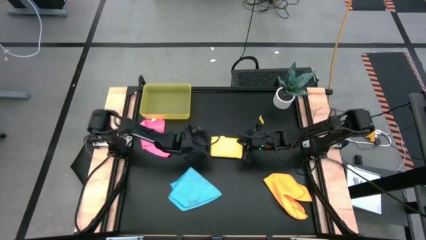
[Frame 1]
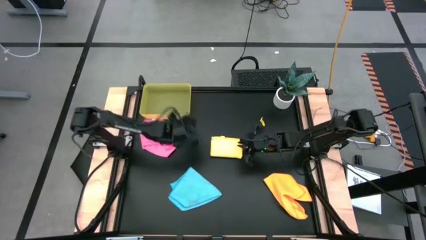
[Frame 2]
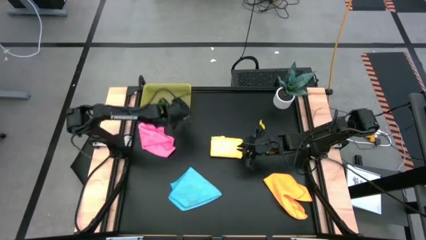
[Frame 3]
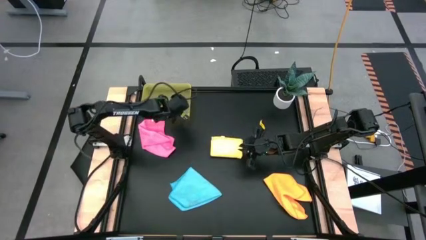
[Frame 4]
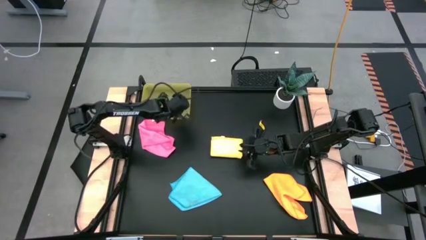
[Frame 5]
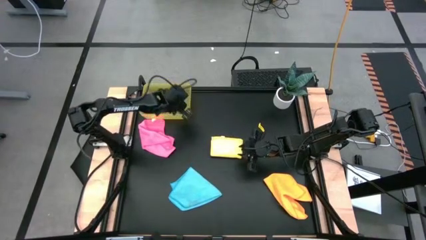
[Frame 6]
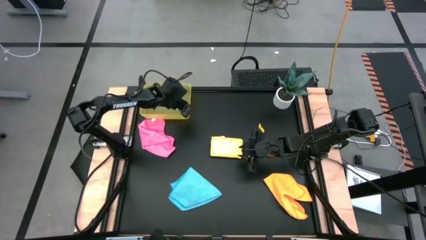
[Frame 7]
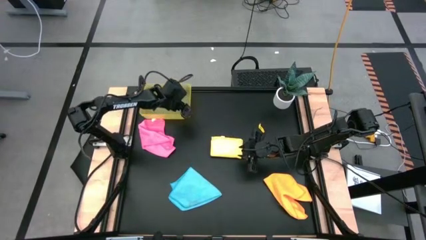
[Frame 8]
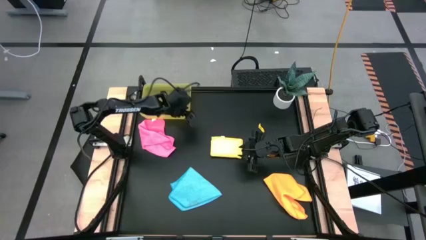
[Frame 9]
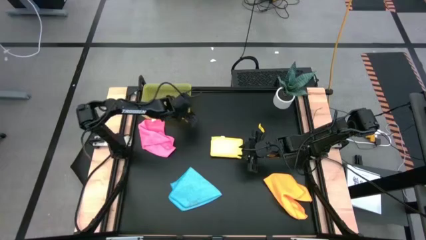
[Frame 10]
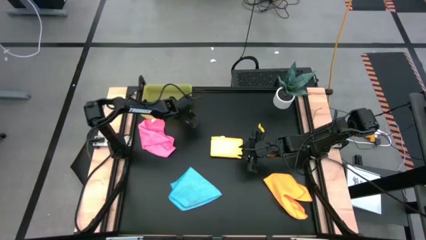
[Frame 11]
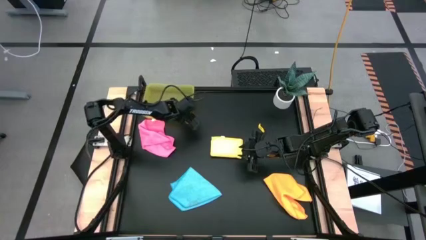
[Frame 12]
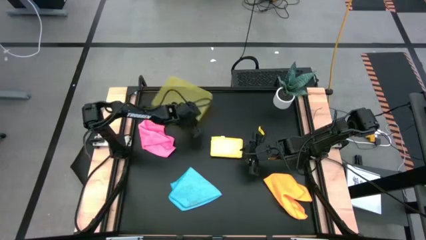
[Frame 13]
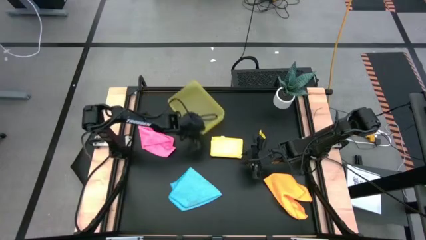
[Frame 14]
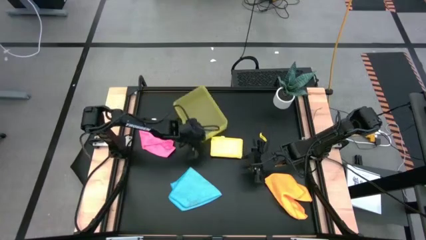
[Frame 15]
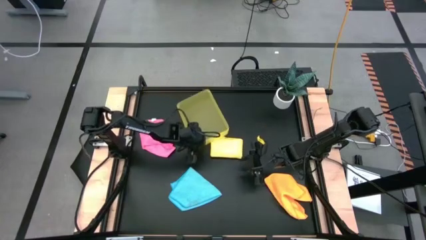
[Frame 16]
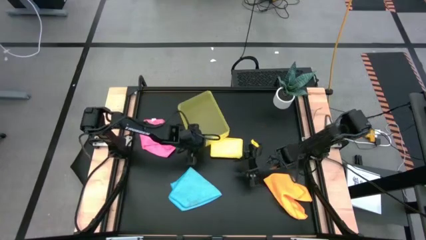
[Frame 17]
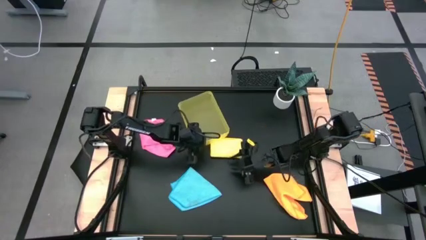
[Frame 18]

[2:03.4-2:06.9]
Task: Fold microfiber towels
Move the yellow bin to the middle of the table

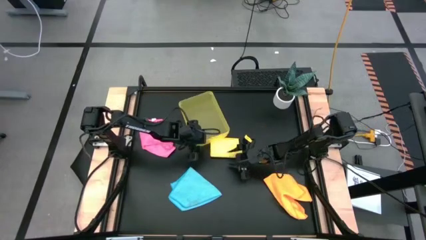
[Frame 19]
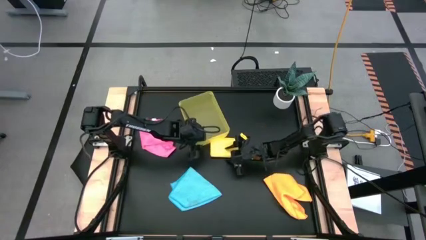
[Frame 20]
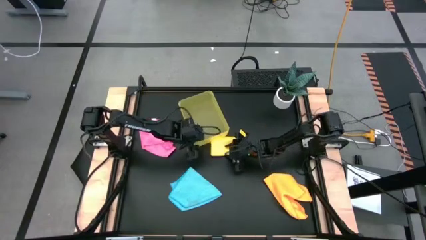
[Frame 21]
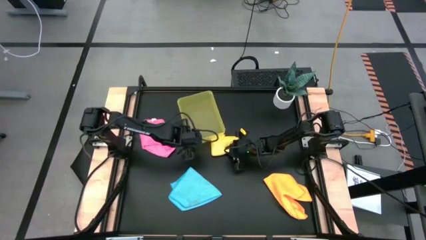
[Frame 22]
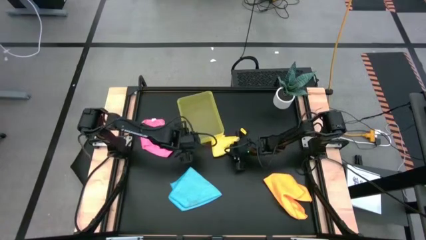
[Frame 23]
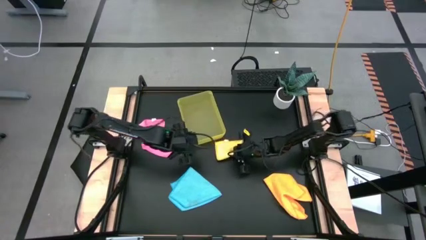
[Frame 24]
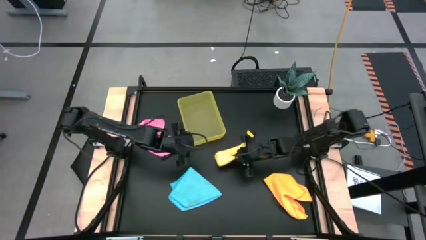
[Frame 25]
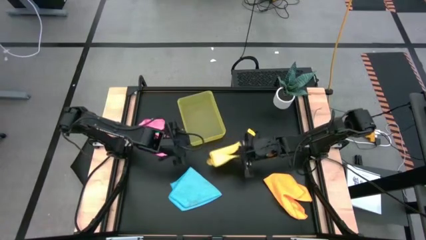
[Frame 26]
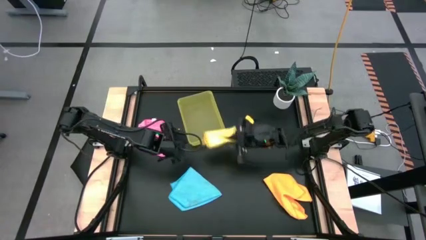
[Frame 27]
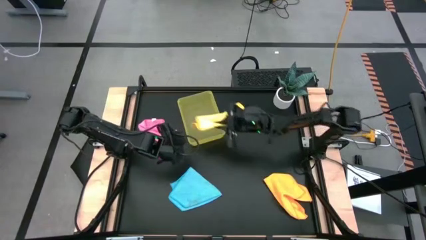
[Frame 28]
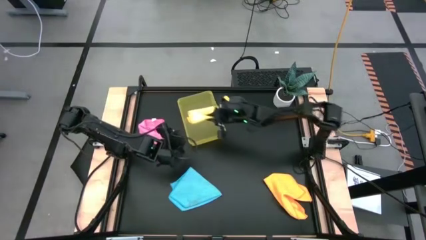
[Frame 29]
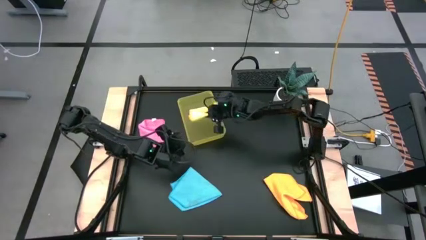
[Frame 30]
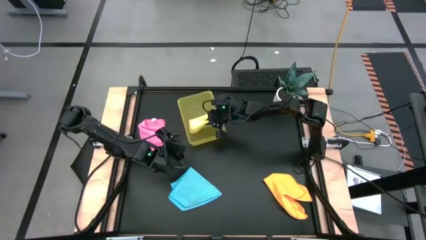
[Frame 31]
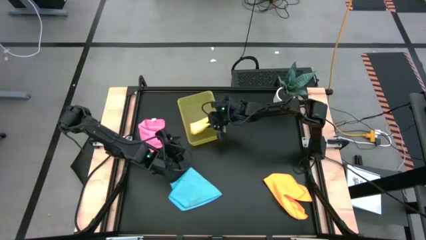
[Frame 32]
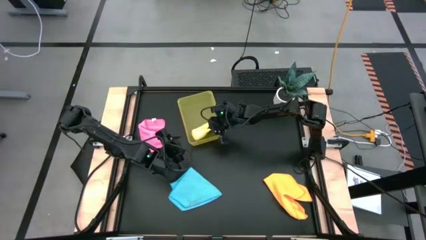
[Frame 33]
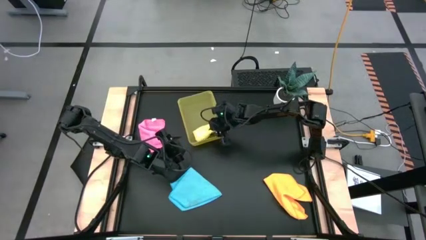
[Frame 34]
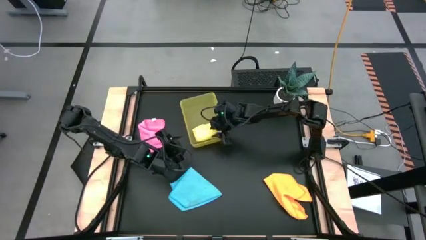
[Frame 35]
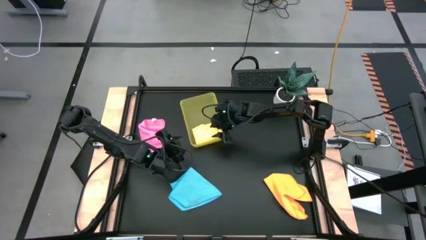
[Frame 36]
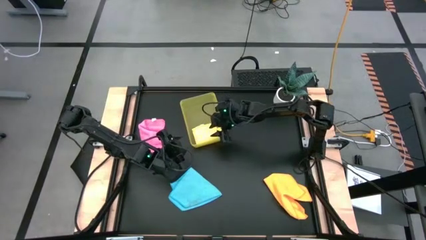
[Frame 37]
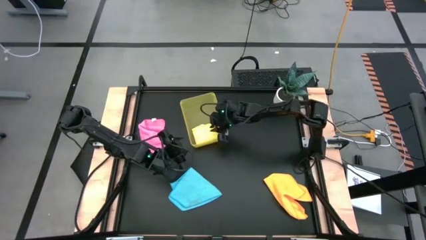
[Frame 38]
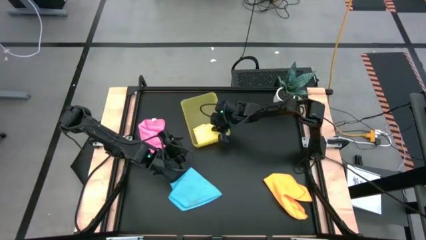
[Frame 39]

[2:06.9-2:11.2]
Put the yellow folded microfiber cloth into the yellow bin

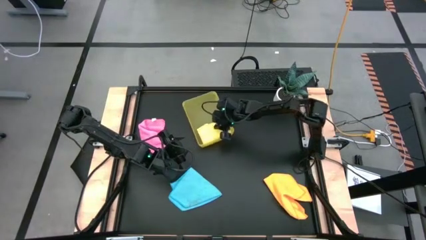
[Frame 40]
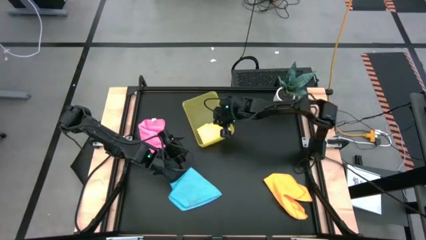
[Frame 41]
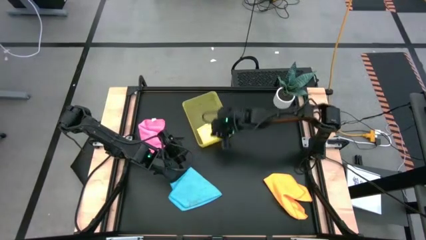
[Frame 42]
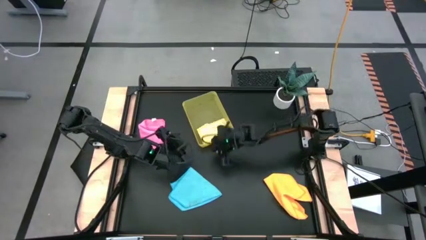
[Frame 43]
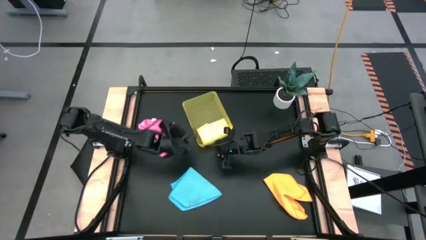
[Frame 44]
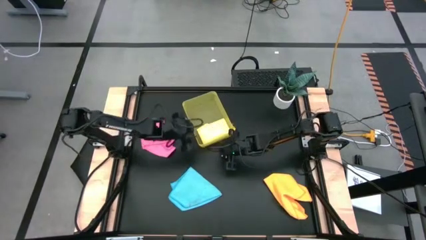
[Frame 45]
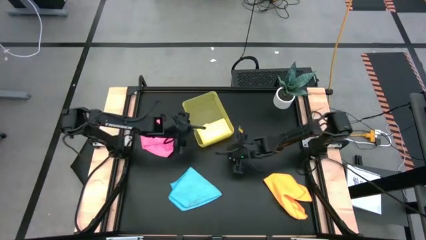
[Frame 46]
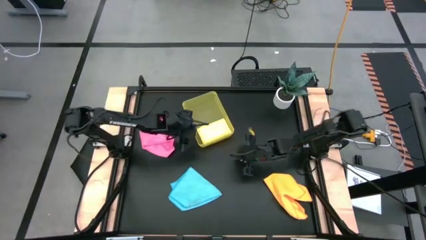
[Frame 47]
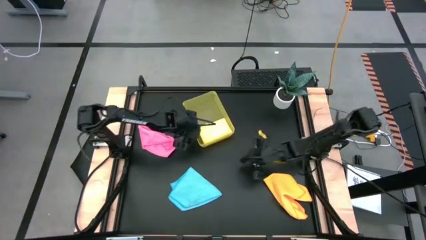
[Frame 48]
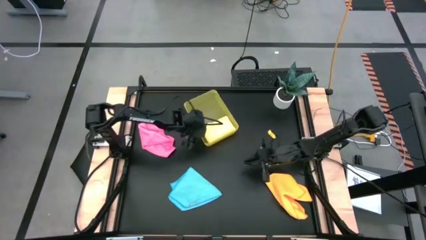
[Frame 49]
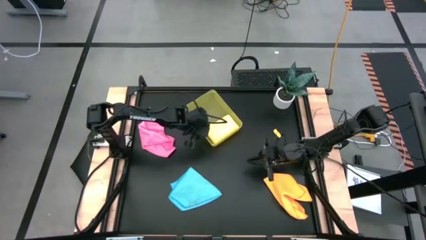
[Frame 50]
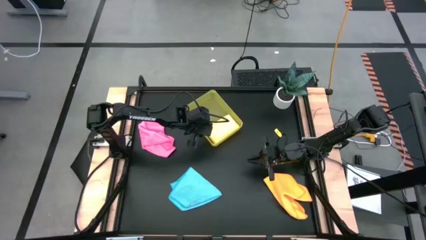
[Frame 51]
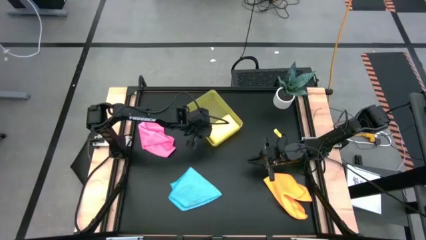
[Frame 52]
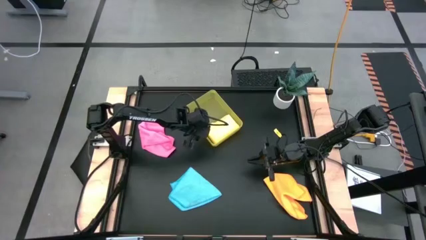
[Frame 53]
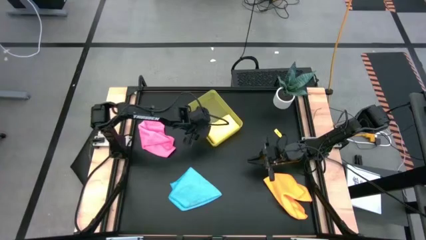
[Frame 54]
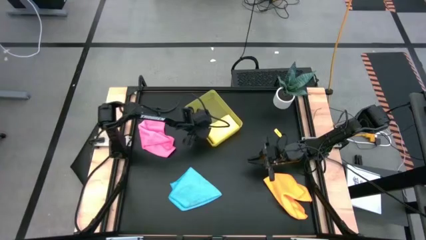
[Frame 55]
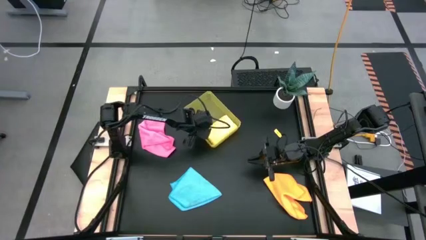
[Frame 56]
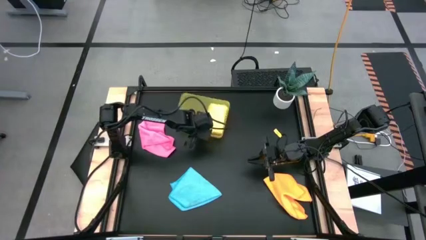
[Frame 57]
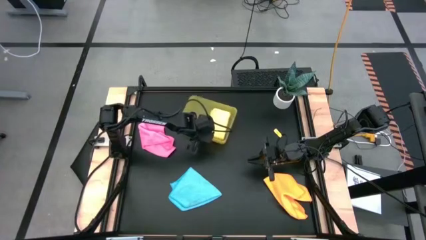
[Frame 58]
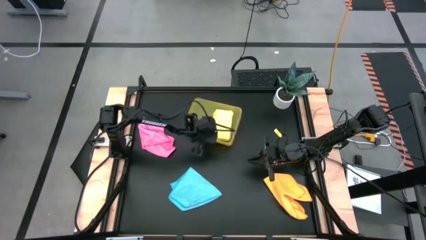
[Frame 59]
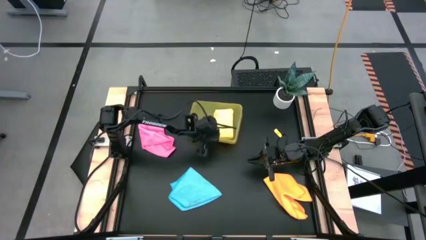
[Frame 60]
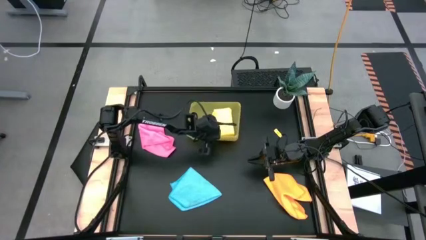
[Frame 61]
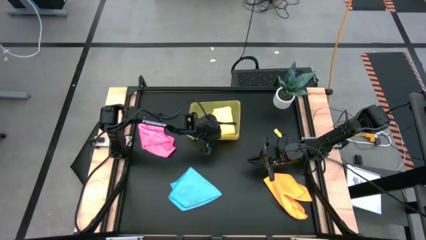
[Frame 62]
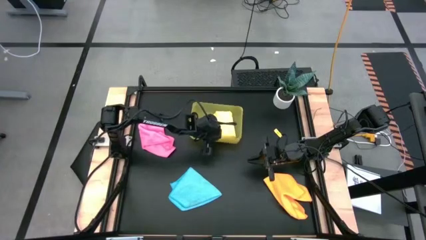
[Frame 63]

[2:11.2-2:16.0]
Adjust the yellow bin

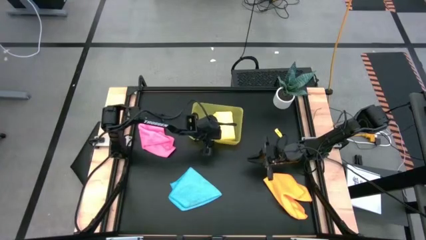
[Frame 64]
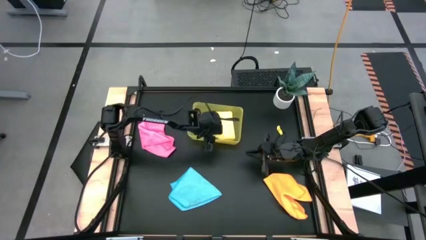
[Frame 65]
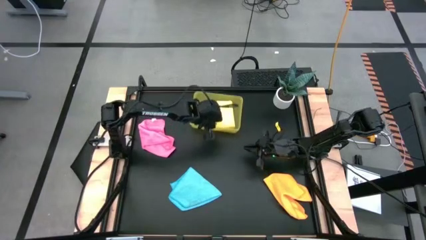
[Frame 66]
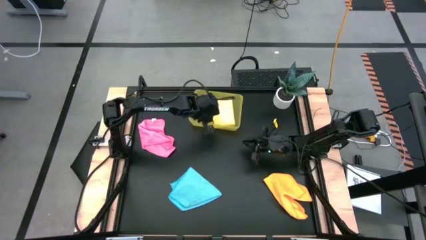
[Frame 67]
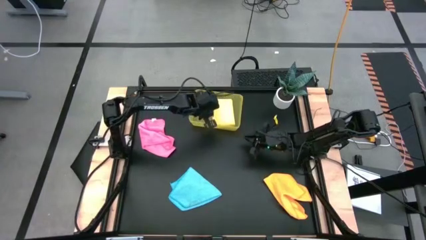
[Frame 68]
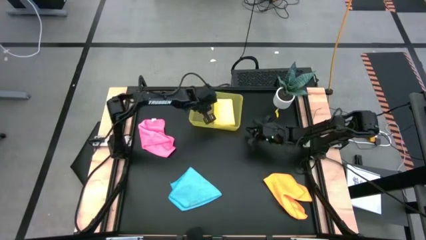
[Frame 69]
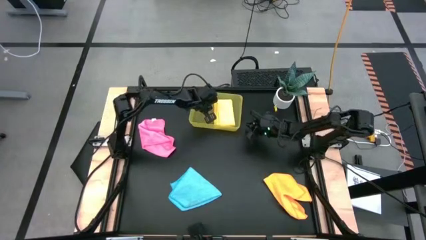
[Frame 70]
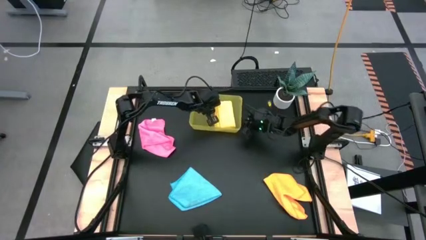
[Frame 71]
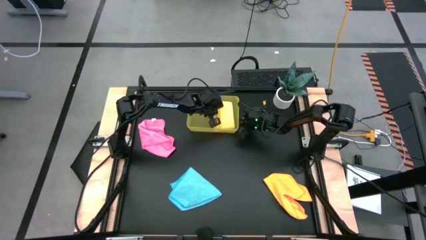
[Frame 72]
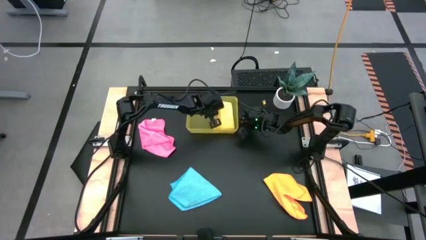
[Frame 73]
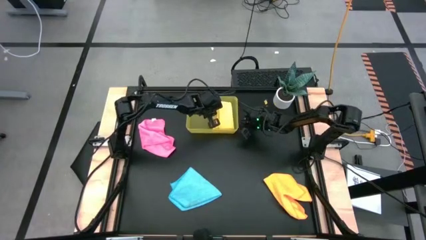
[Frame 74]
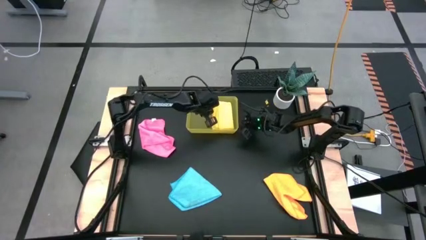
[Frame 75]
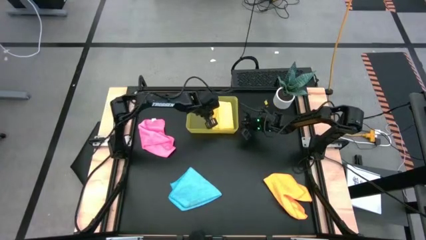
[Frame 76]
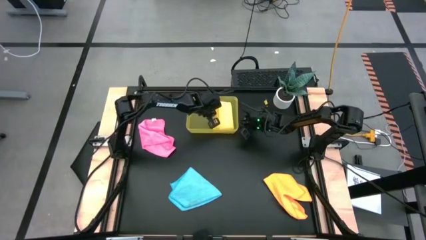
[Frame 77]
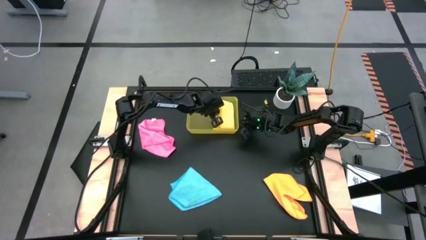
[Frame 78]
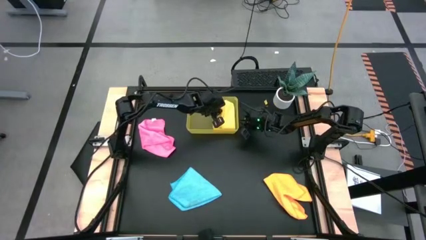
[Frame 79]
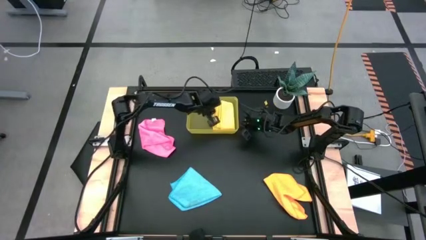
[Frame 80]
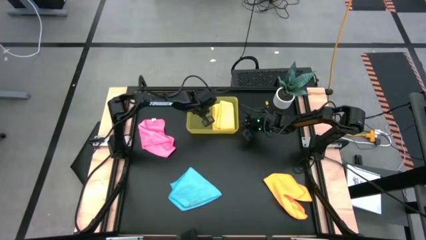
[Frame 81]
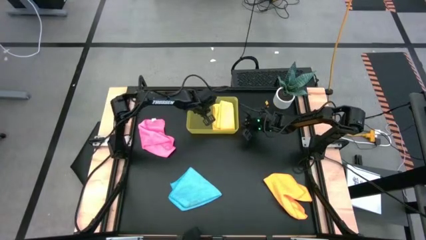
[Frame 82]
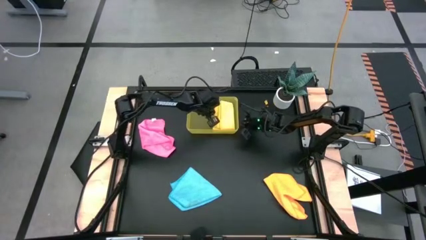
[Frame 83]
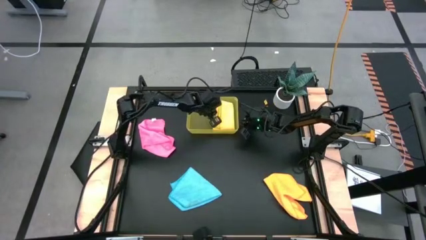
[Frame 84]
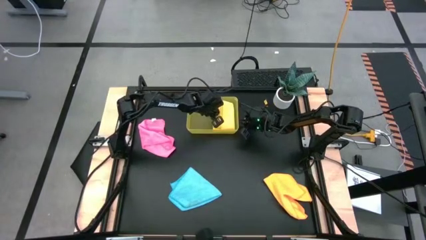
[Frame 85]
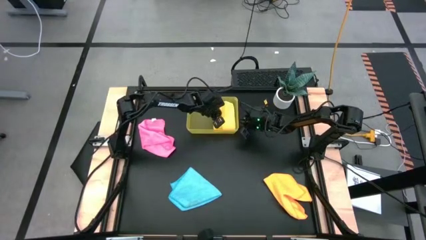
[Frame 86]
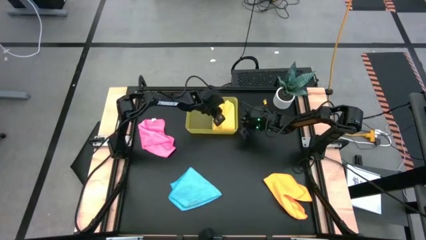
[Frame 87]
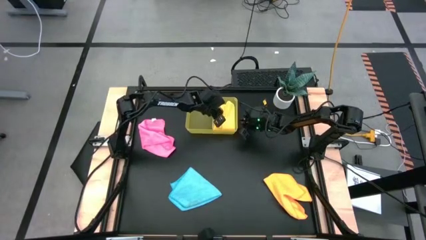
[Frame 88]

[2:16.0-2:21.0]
Adjust the yellow microfiber cloth in the yellow bin
